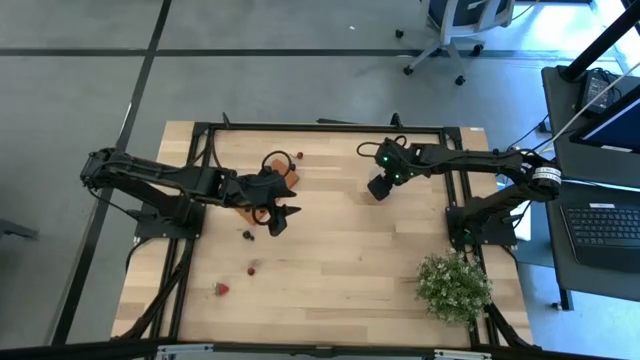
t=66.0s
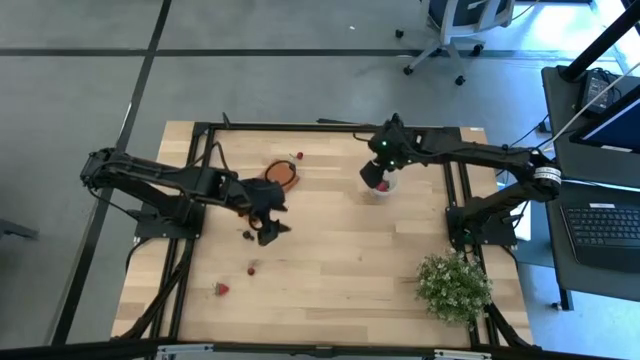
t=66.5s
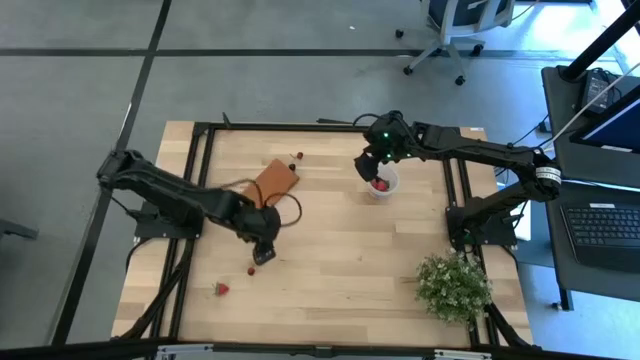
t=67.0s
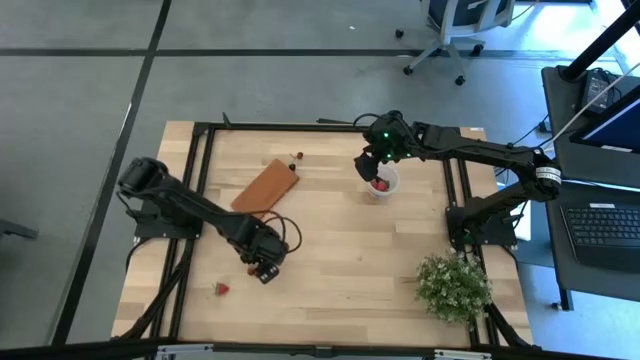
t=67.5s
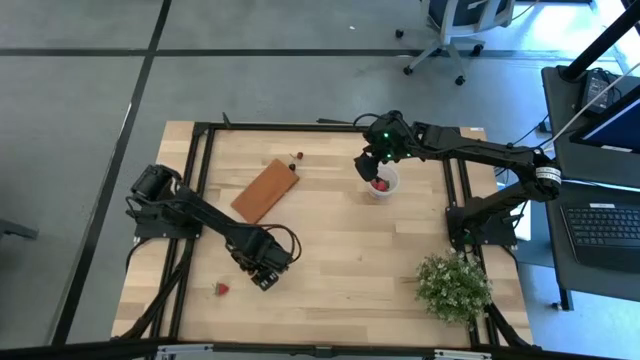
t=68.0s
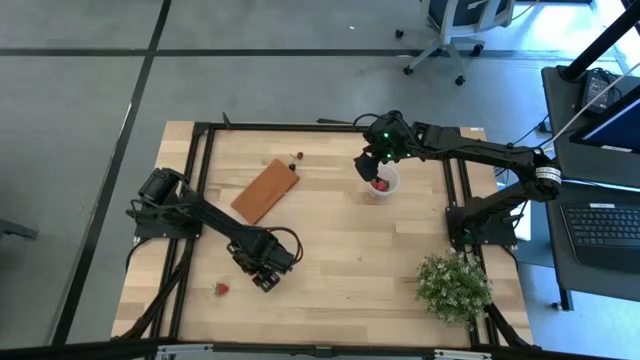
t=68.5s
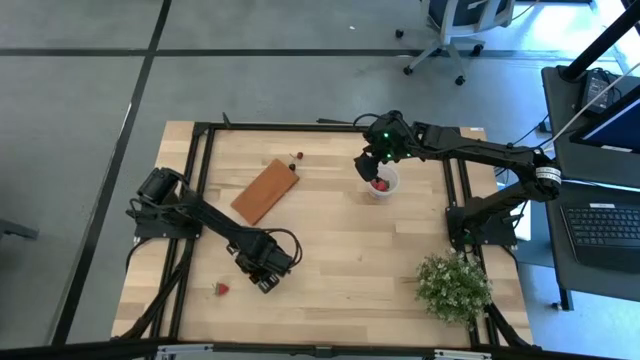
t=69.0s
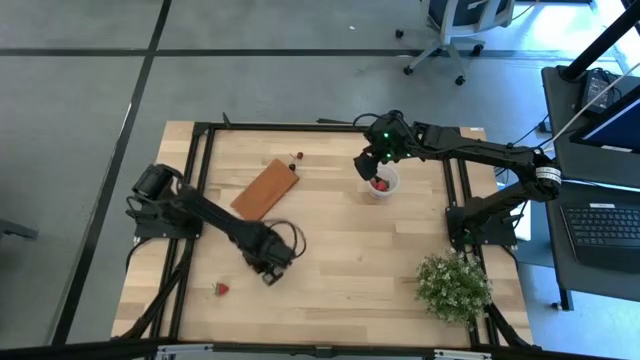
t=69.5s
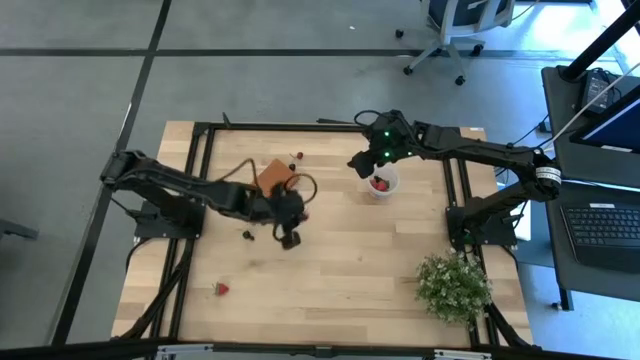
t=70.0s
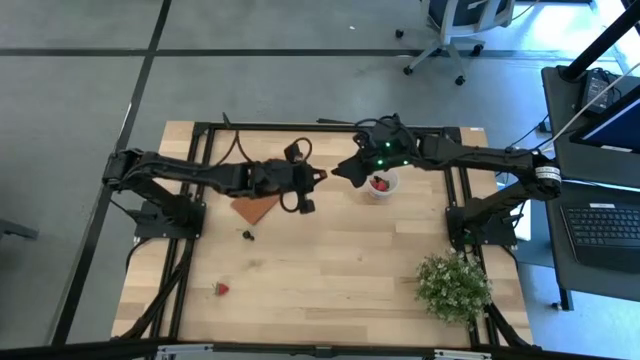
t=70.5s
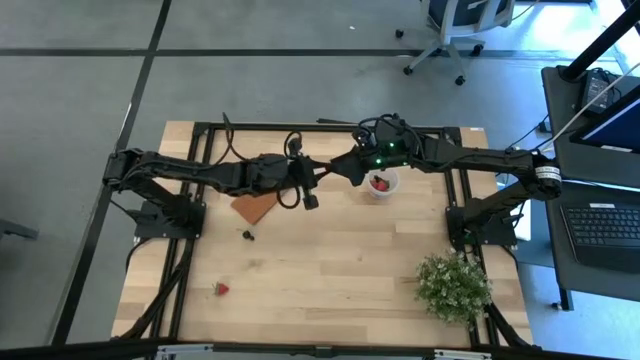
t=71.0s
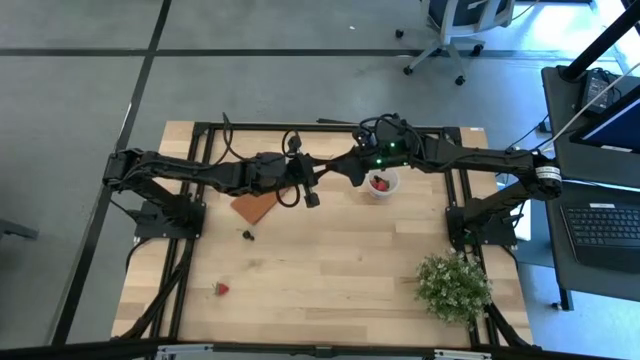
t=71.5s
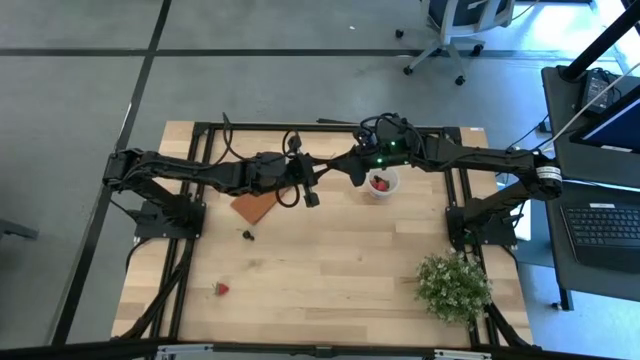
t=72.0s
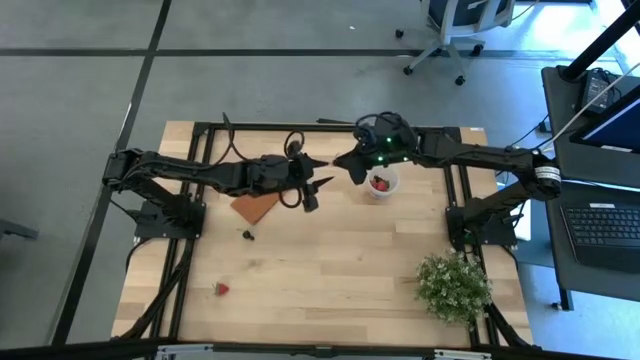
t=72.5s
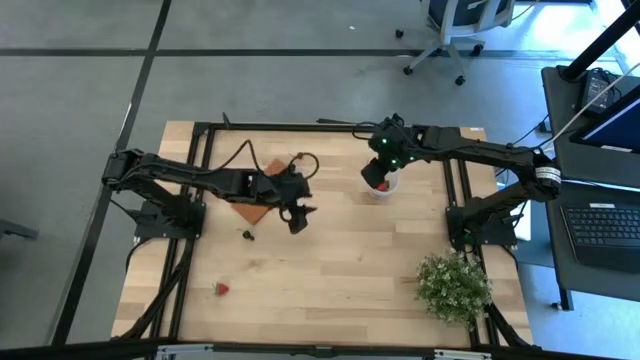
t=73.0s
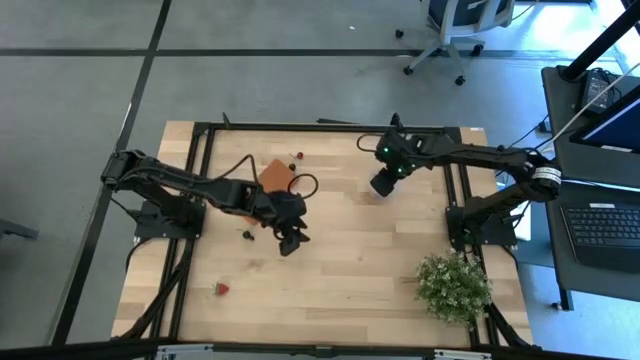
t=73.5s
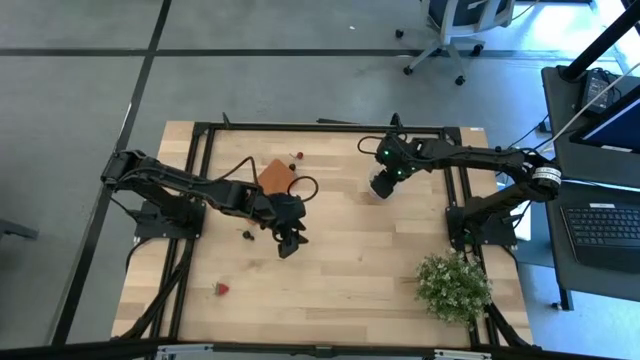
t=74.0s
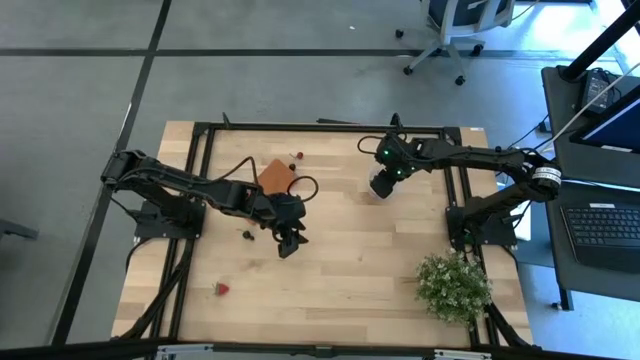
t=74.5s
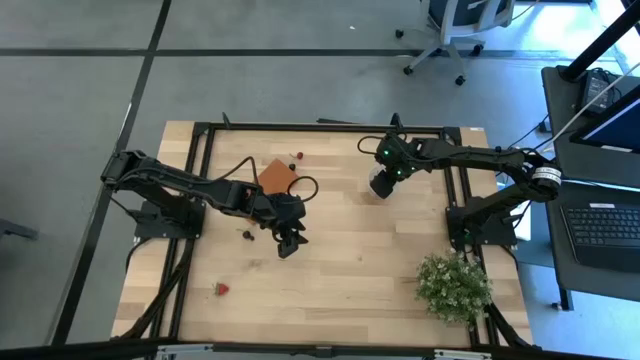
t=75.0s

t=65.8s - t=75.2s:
Task: Pick and placing Produce into tupperware
Put the bottom red cherry into the transparent container

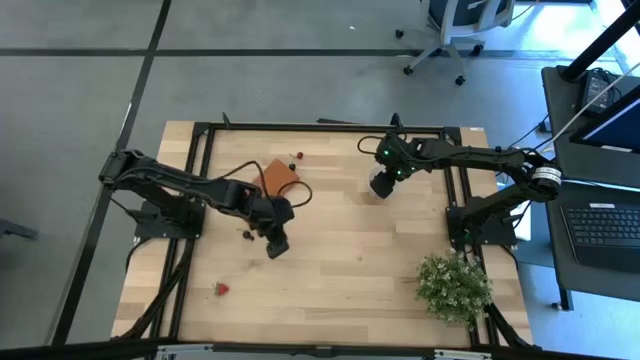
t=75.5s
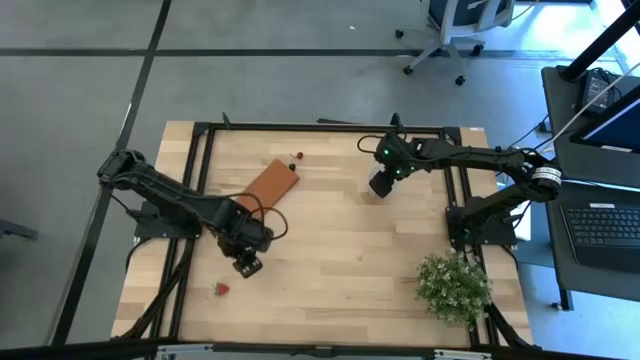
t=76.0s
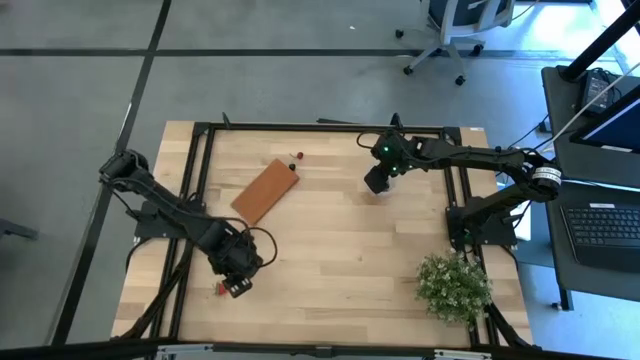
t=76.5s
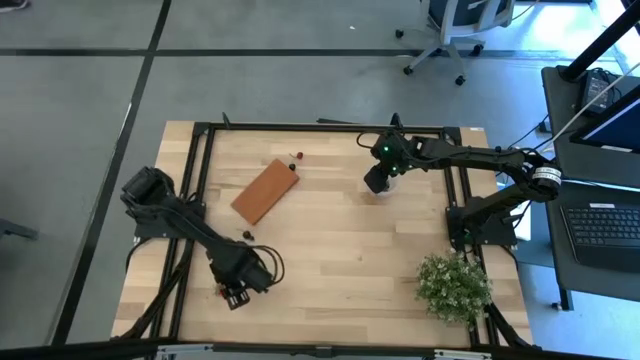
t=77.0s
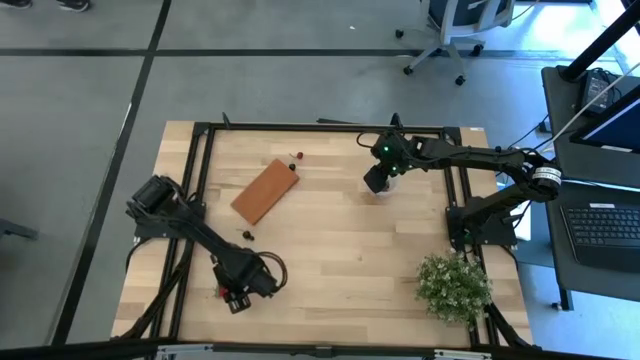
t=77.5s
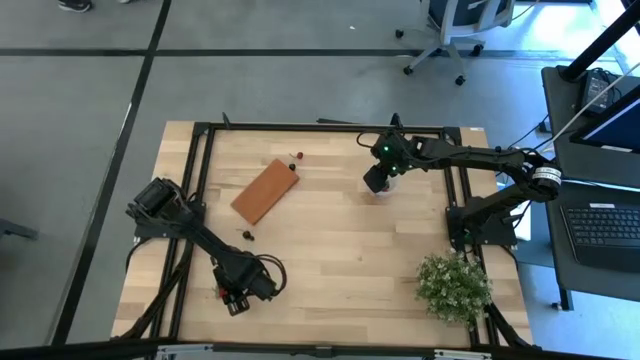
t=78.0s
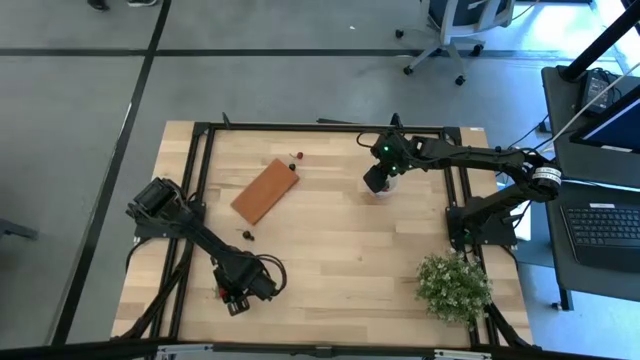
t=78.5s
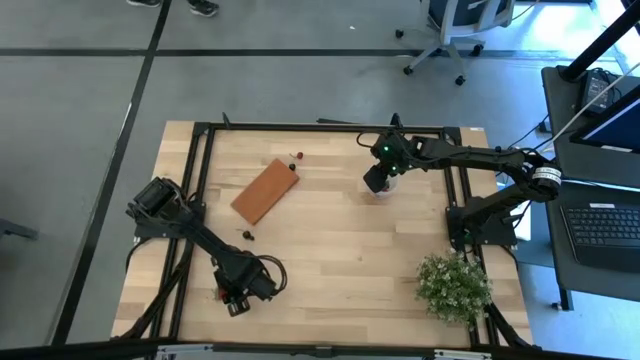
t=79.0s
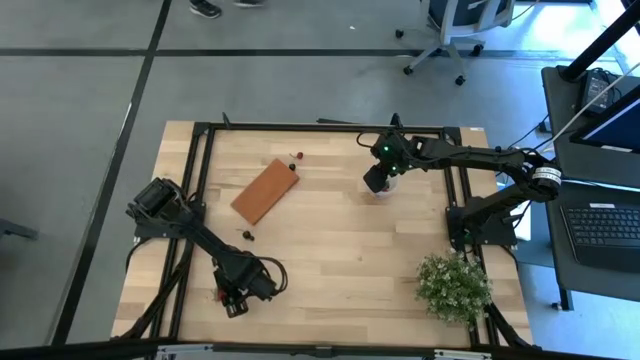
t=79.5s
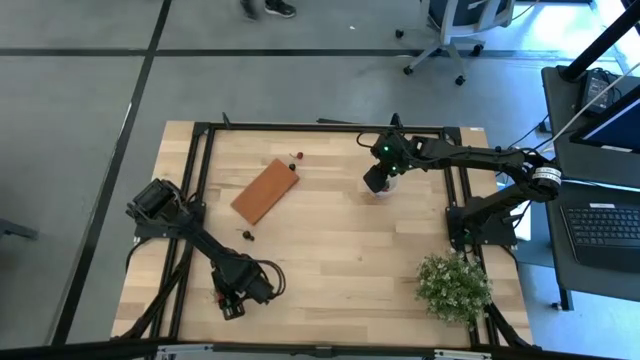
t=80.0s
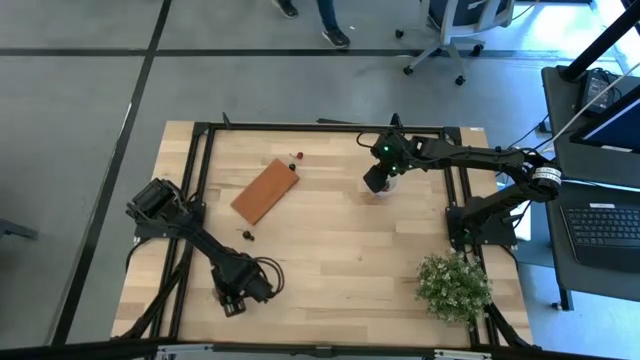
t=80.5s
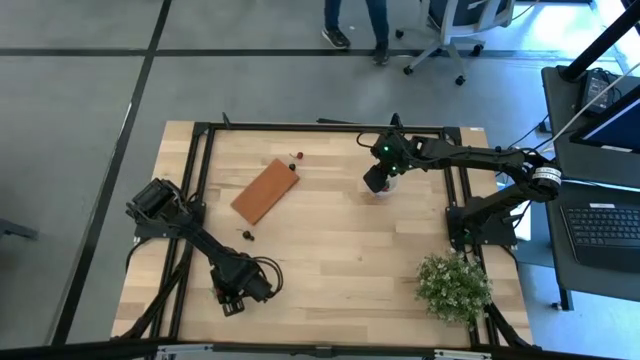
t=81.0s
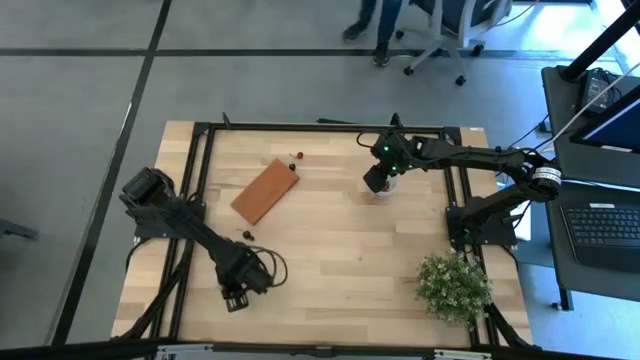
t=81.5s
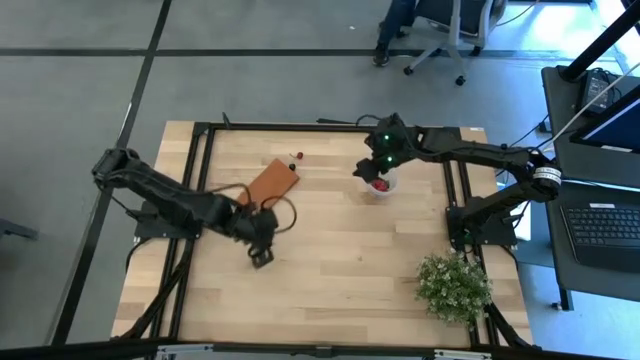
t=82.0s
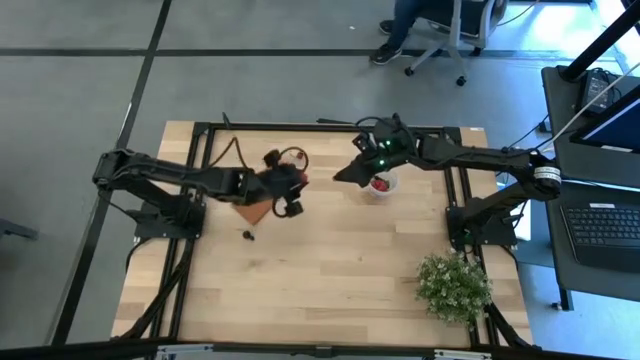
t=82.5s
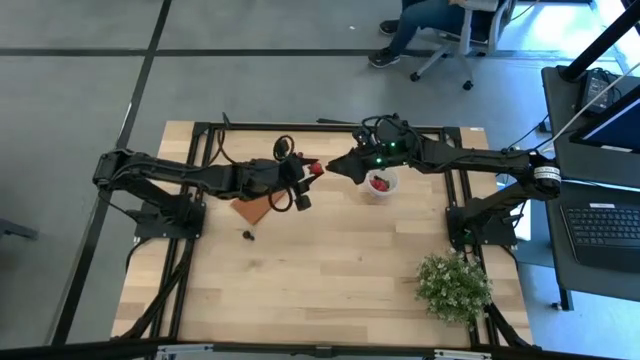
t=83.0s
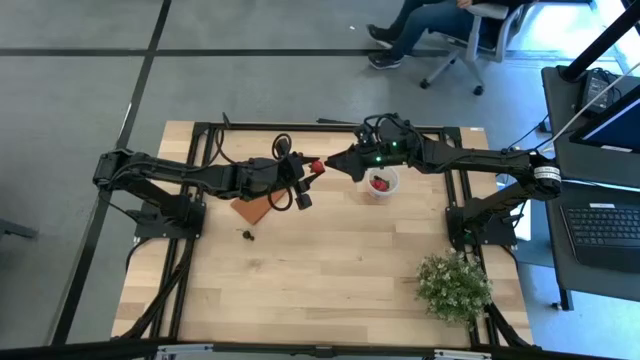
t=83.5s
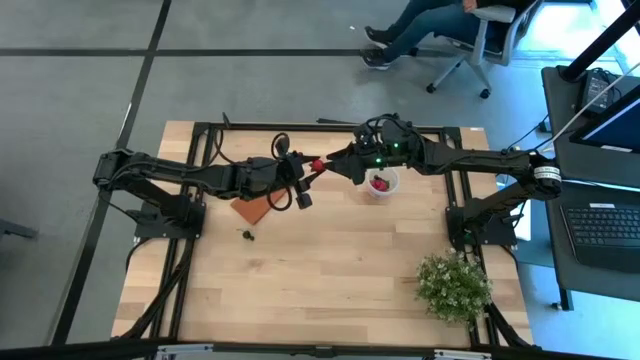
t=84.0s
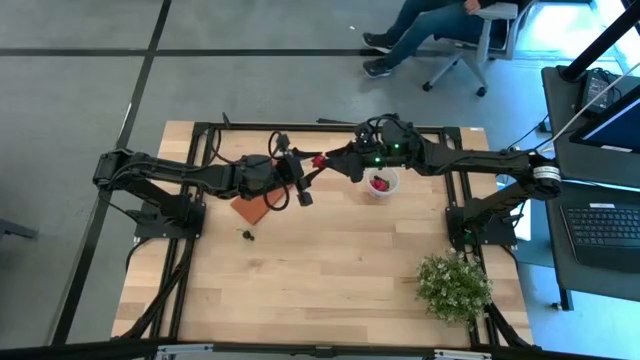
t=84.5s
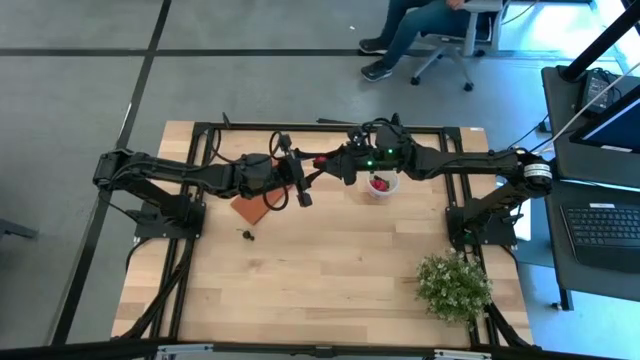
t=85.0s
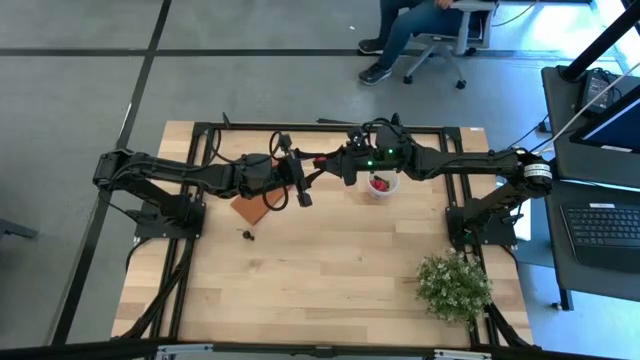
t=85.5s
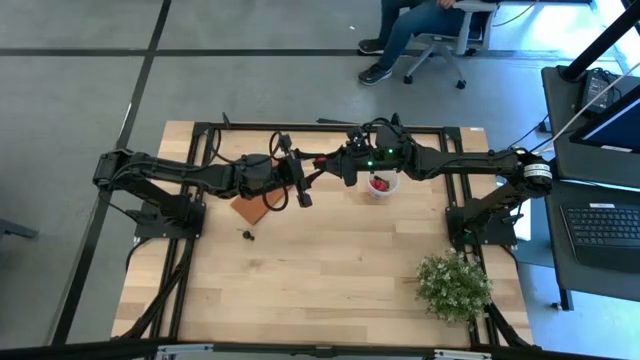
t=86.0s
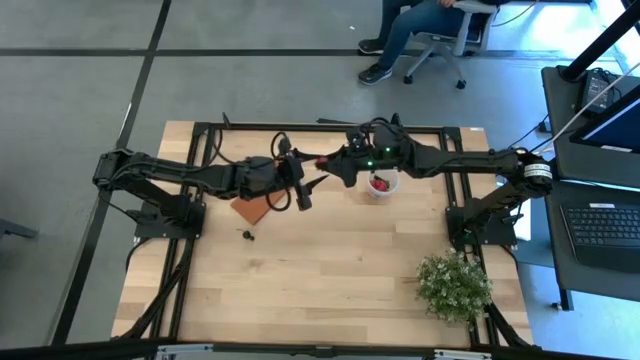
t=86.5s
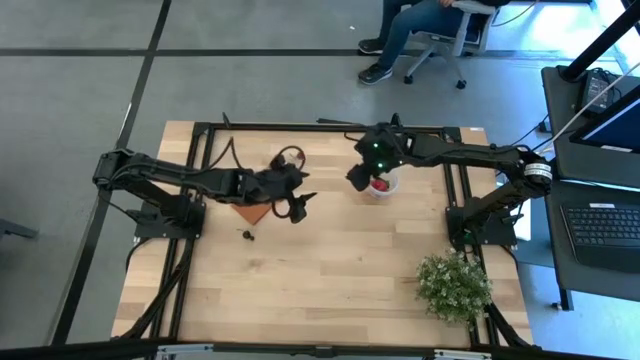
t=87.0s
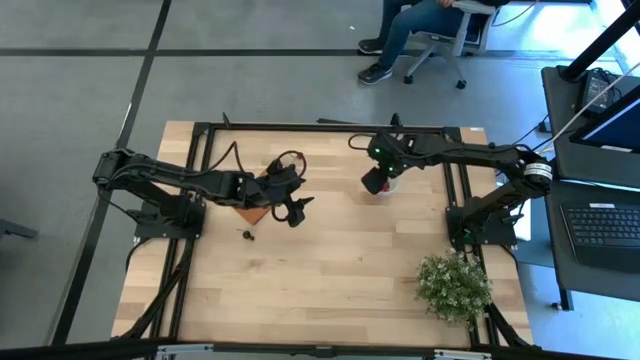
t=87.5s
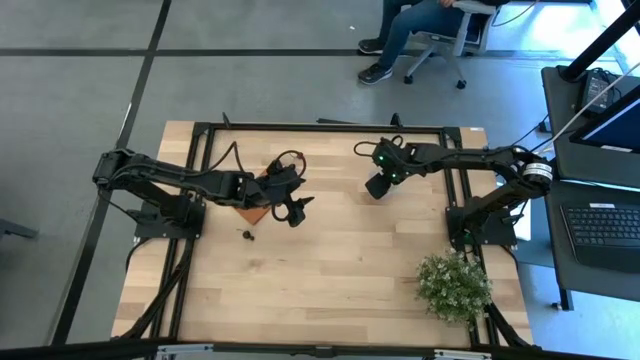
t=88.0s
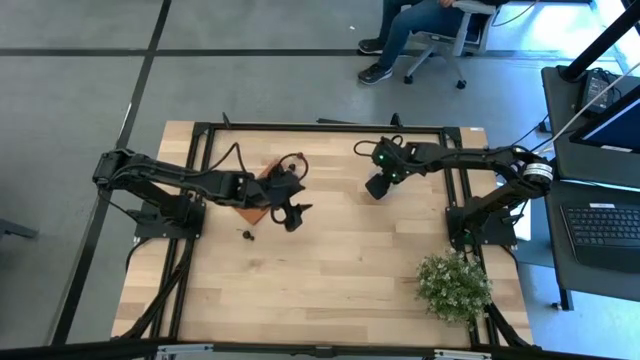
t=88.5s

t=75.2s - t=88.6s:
Put the red strawberry into the transparent container
